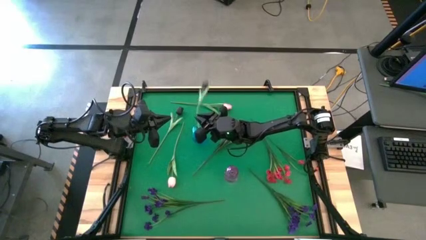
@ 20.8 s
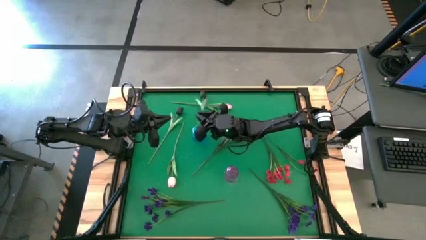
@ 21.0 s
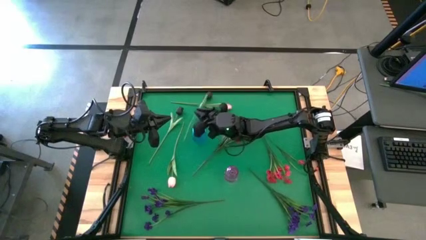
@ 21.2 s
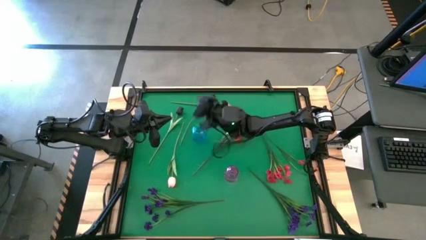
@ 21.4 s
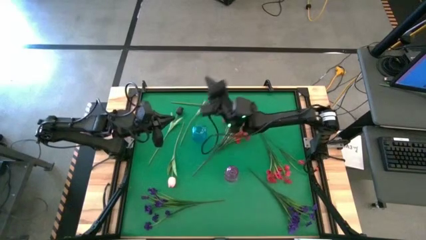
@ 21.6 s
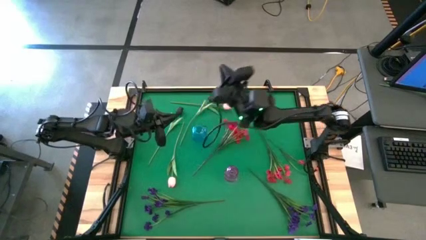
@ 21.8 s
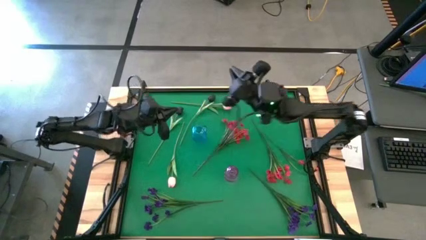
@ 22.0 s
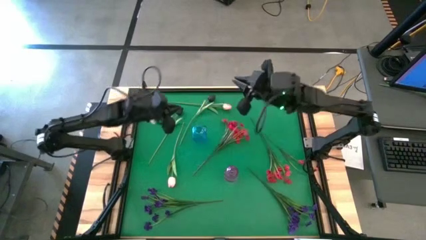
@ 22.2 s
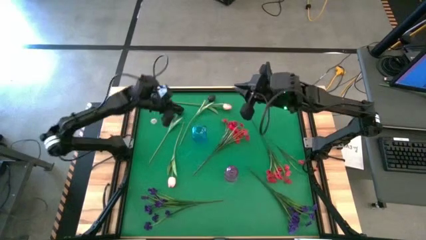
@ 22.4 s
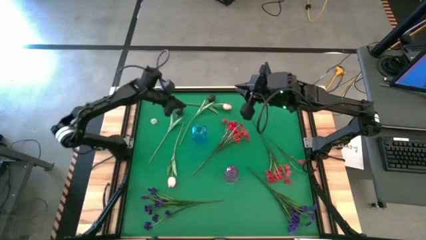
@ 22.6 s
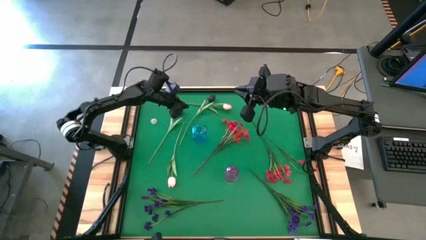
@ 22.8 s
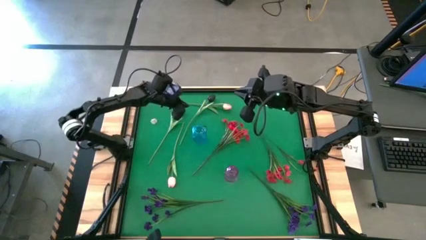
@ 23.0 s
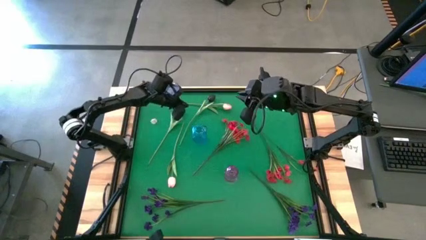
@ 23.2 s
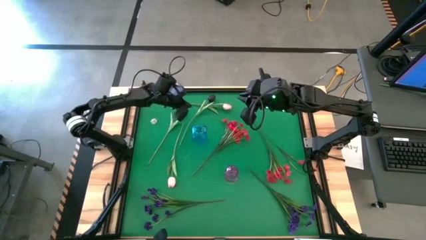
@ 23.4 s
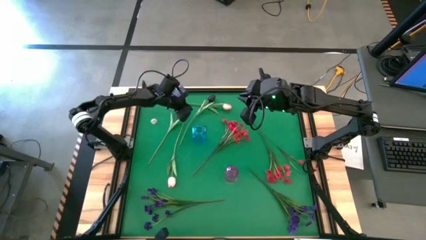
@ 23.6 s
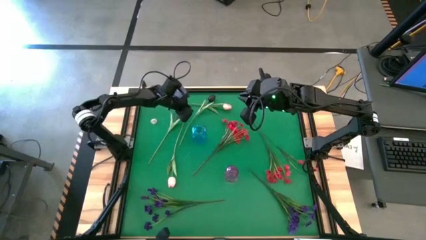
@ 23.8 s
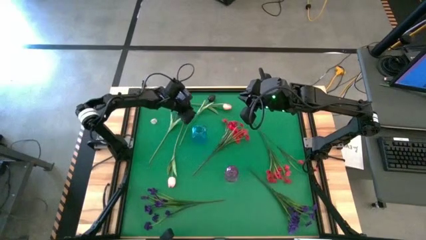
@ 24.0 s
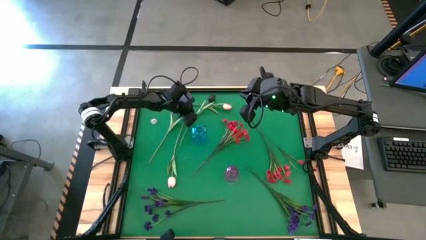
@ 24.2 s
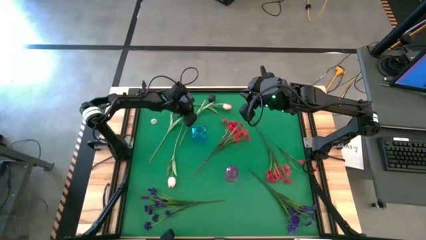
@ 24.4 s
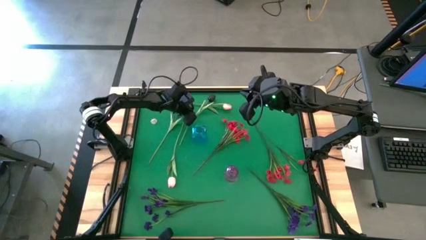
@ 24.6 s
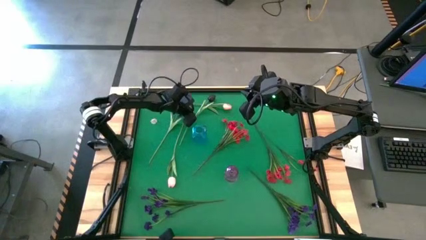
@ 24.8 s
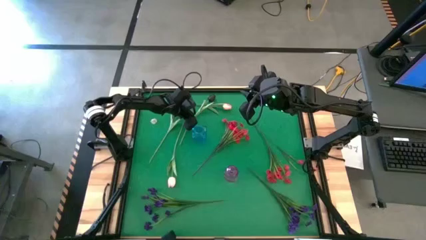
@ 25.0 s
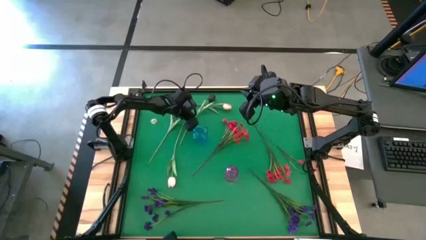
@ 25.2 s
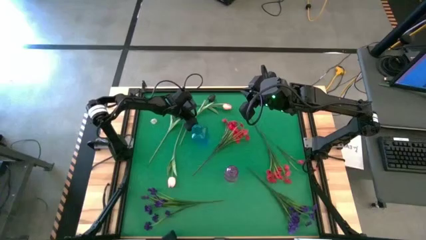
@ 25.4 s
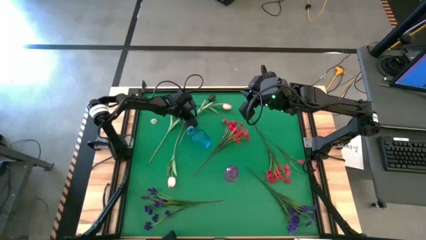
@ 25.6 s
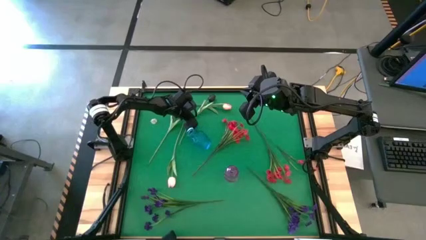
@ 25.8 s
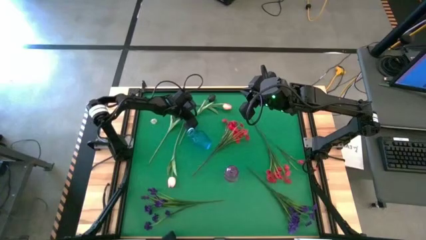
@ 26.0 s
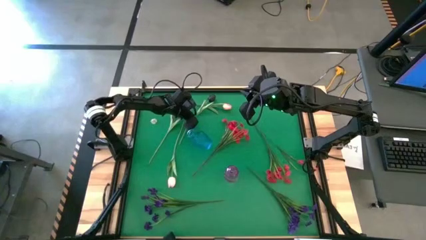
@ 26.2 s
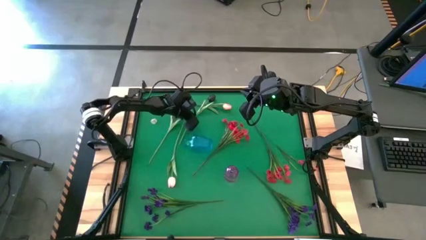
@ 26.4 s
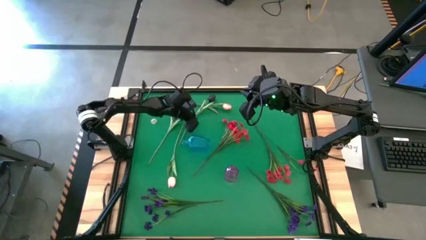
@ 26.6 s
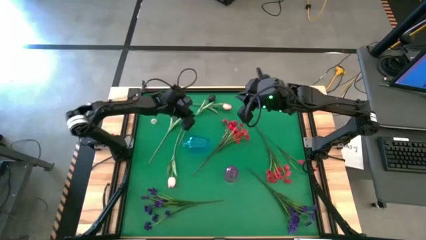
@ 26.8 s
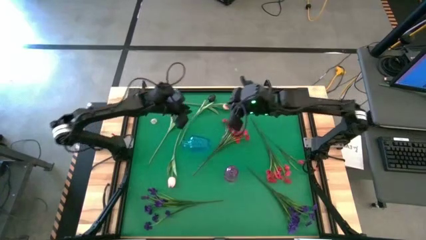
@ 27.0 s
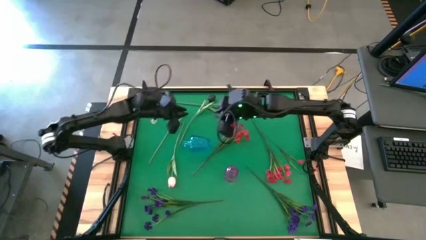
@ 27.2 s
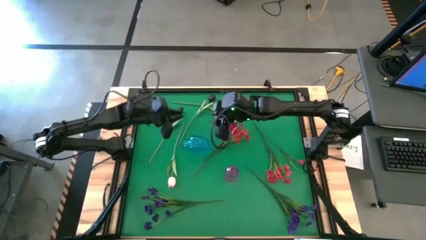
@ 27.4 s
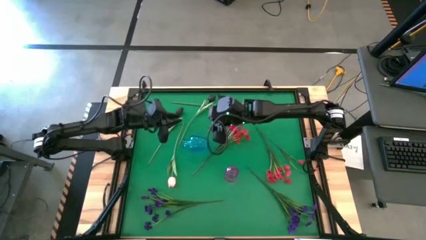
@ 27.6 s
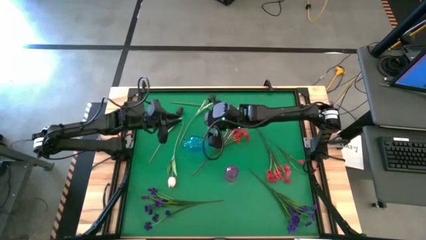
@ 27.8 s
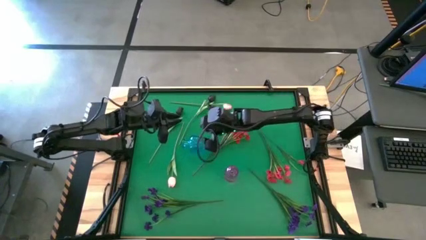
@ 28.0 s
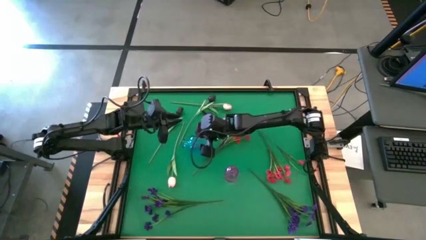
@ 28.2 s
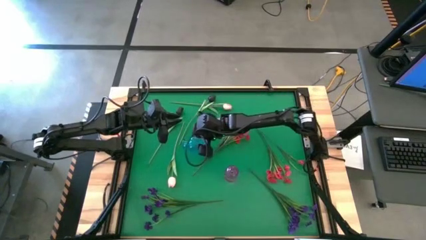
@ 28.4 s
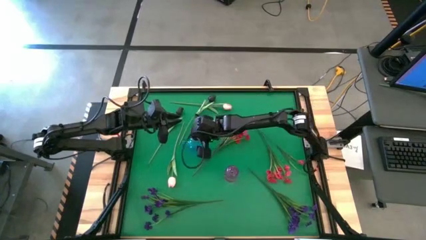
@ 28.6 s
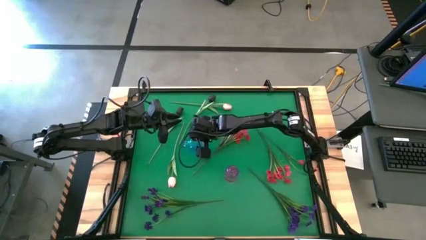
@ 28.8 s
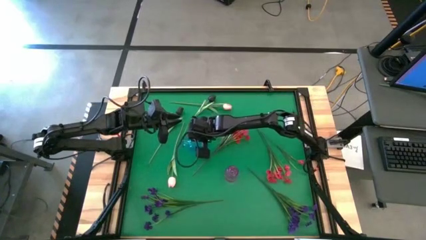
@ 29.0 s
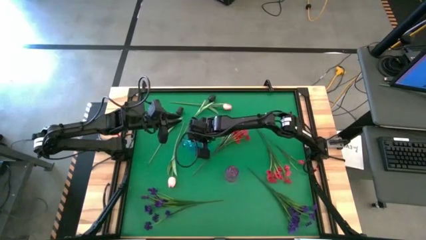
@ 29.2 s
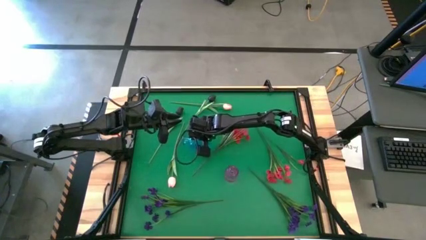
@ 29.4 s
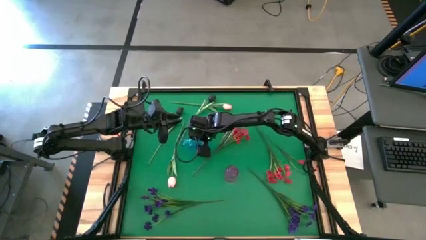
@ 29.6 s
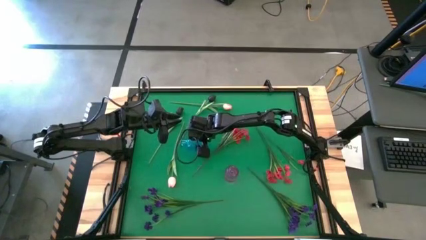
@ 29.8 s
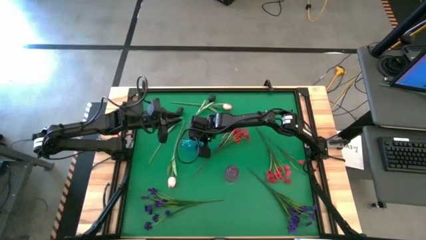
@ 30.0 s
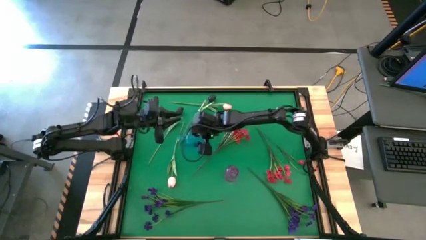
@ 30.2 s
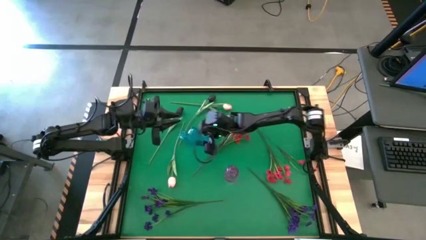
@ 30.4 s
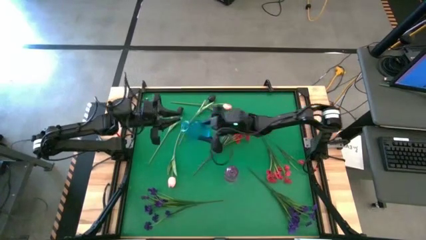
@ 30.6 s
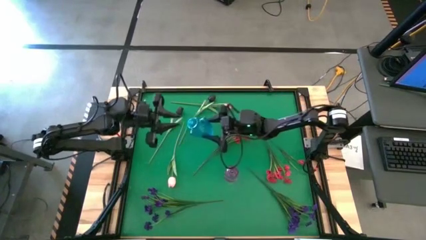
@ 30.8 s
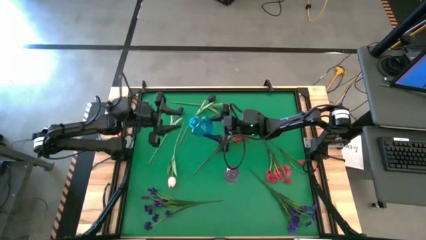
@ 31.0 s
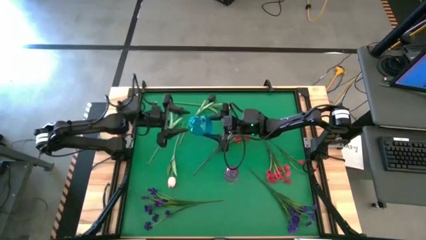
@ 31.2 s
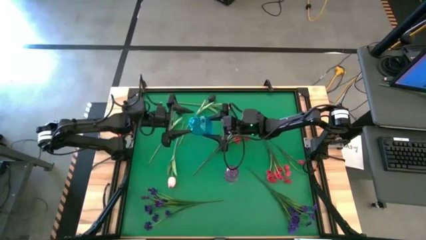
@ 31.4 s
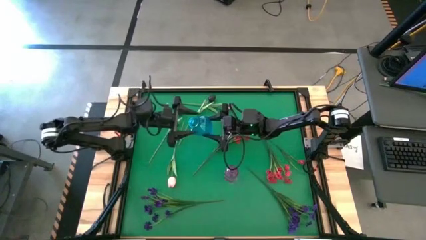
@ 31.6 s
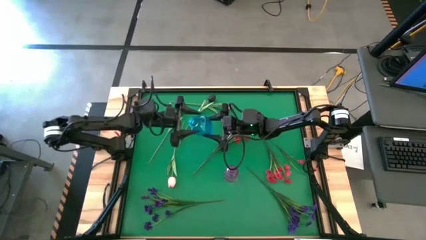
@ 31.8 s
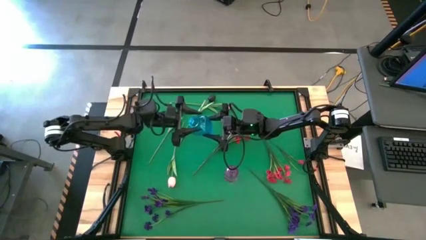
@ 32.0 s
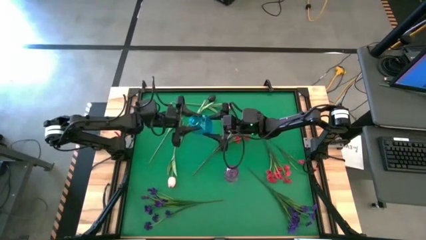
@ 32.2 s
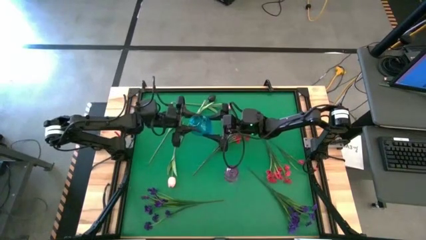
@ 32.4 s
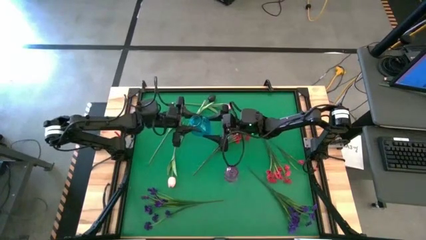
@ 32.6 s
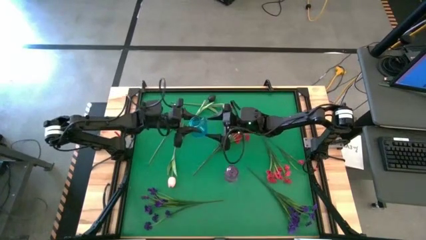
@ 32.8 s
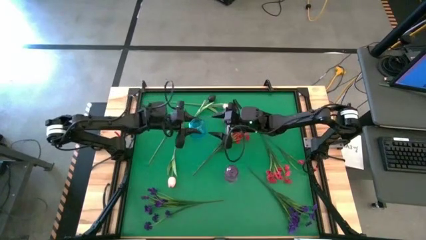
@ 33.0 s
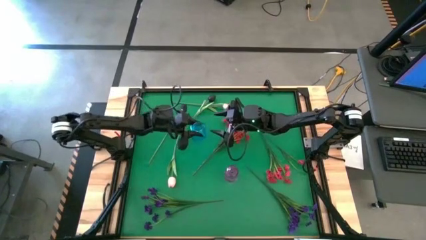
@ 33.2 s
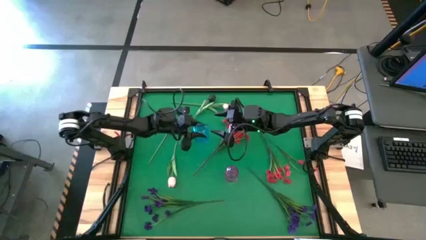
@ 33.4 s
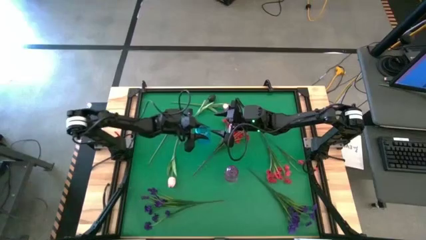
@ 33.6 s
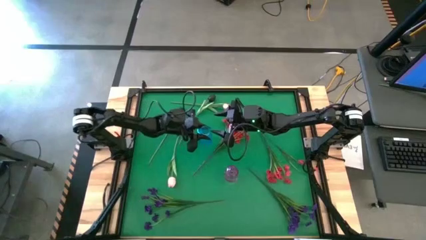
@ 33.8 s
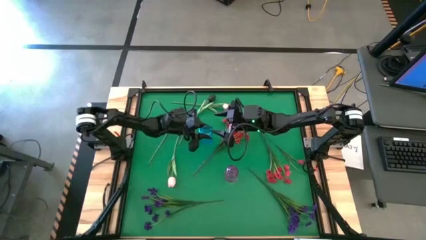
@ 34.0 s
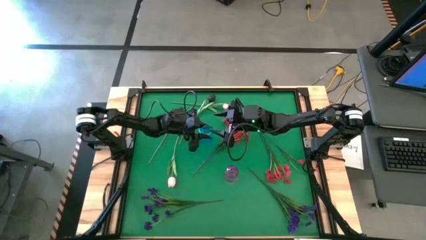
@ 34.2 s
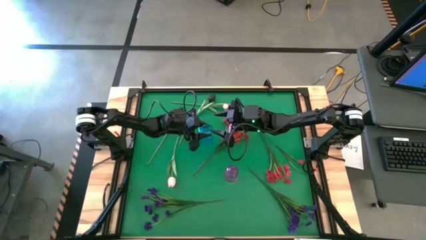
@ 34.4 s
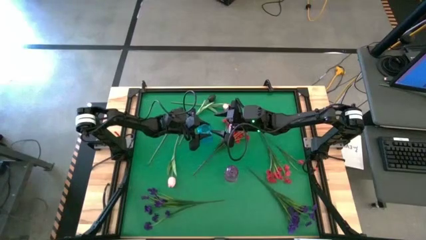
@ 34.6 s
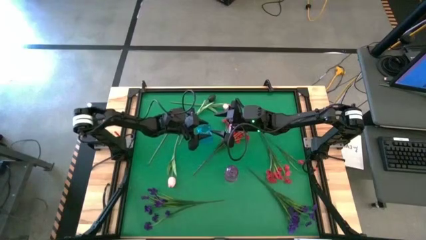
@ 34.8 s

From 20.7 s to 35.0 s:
Task: Sort flowers into vase by color
Adjust the blue vase
